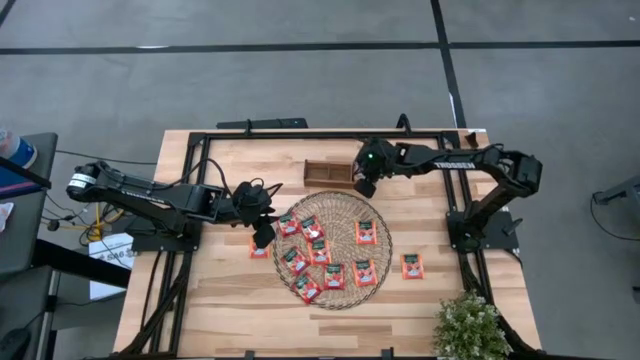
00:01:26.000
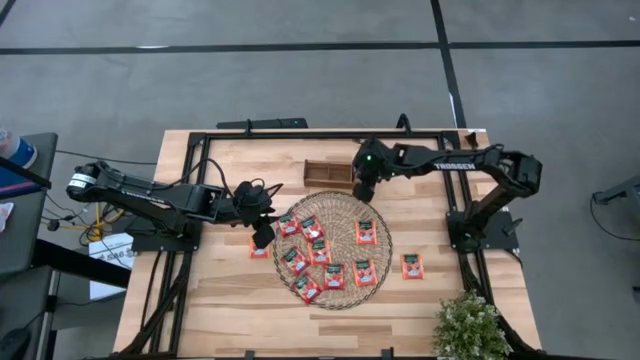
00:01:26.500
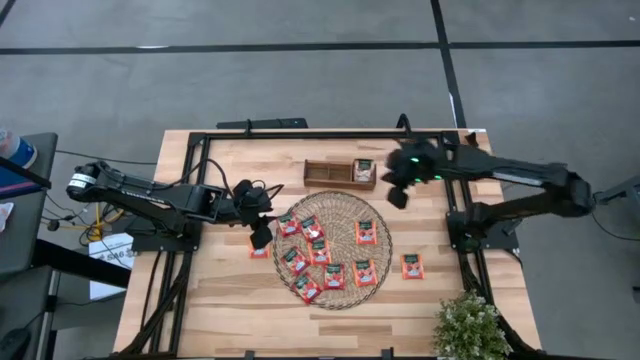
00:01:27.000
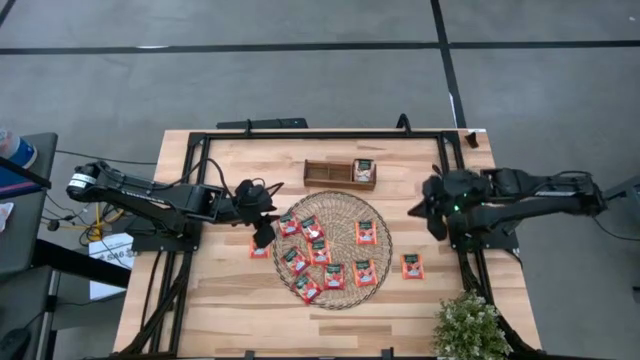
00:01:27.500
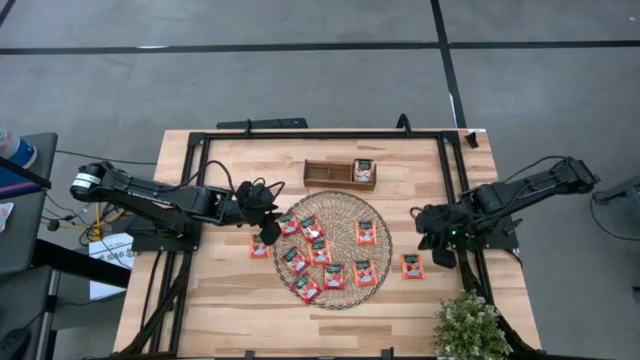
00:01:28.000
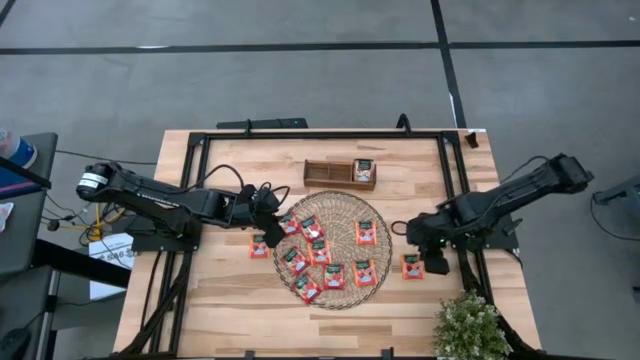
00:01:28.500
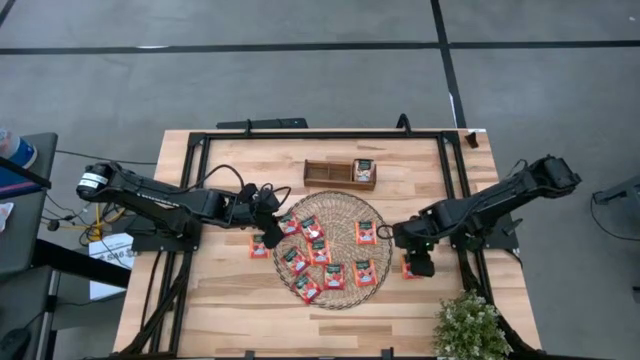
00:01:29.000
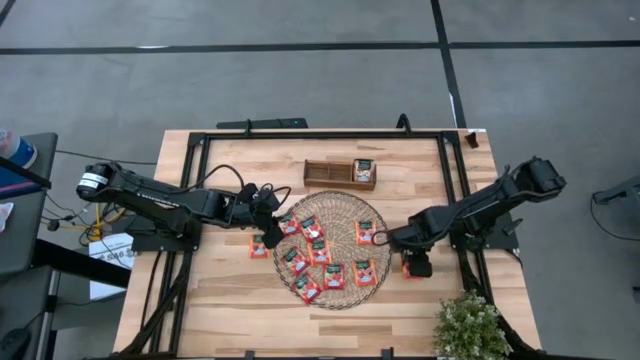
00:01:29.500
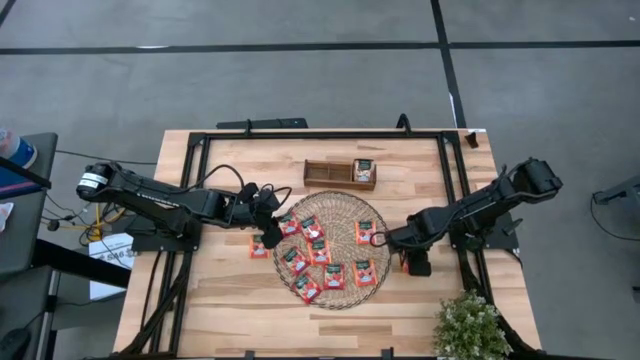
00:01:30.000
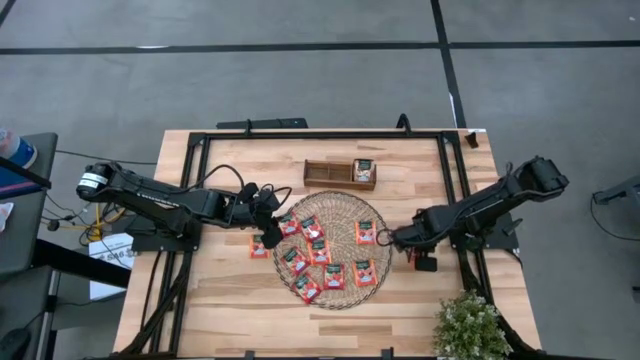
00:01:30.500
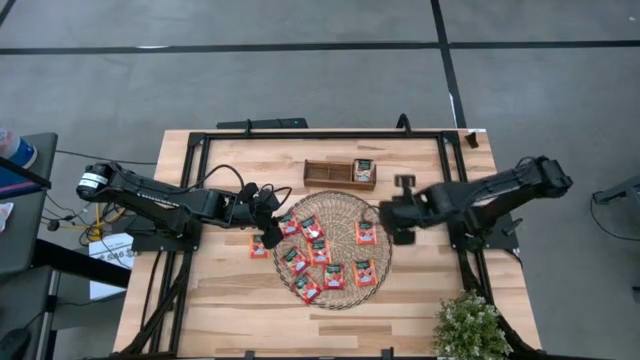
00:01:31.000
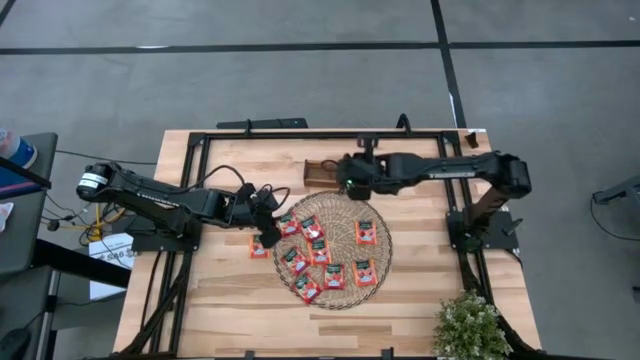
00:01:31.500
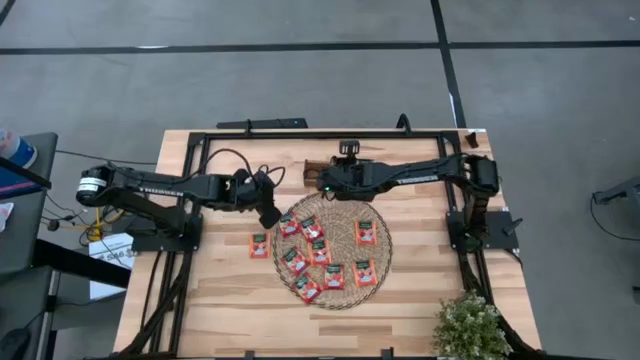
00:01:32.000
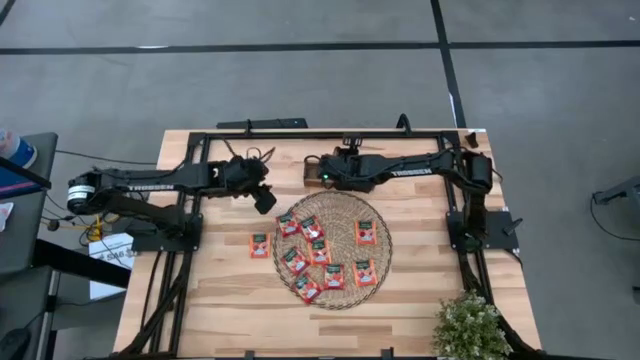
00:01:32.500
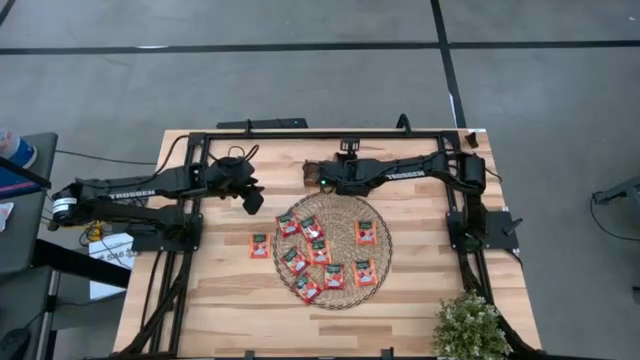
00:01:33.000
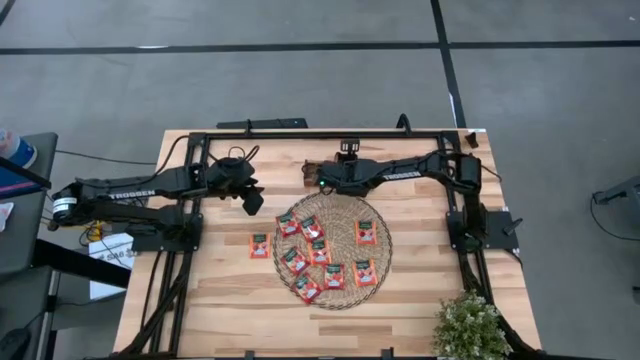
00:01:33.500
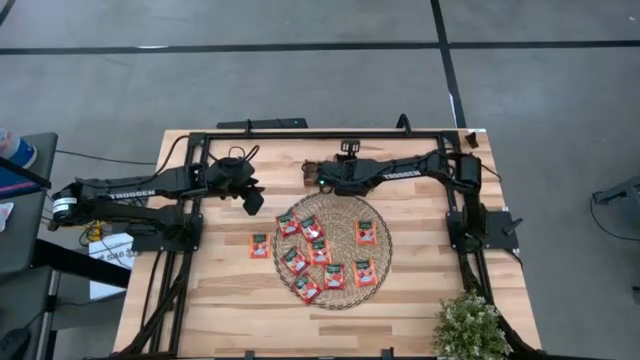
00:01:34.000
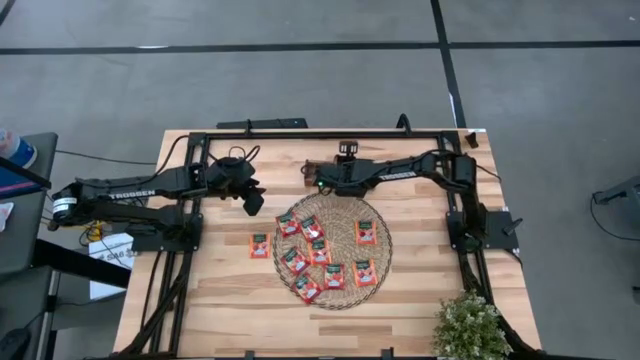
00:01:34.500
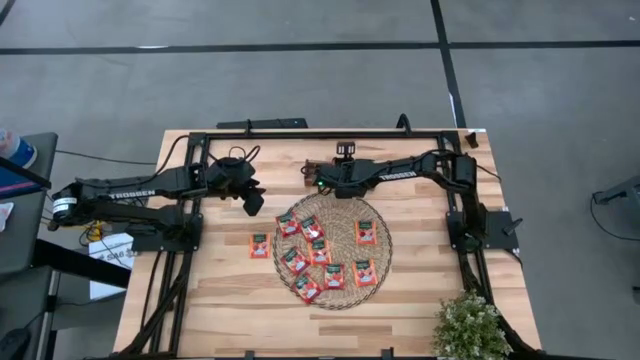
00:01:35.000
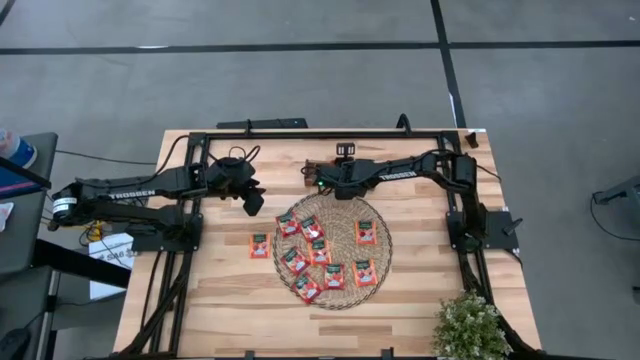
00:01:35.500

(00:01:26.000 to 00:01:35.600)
Task: Pick & Place Tea
Put the orange tea bag into the middle slot of the wooden organizer

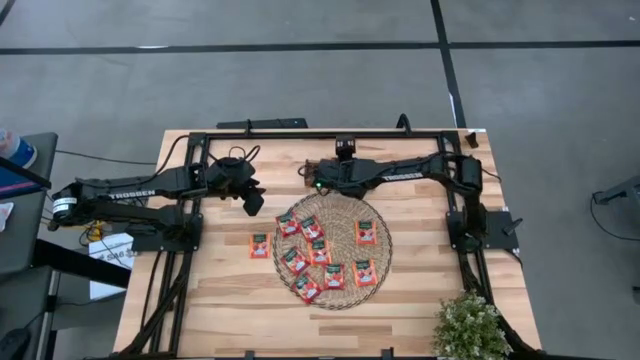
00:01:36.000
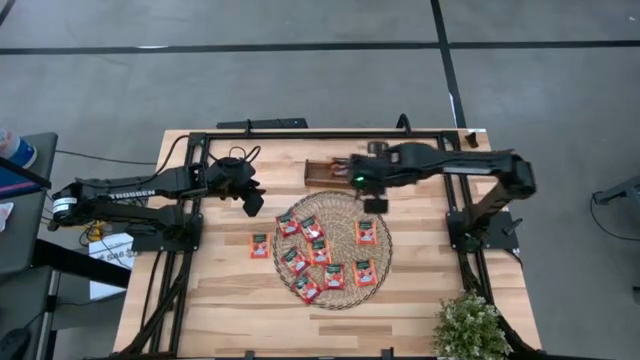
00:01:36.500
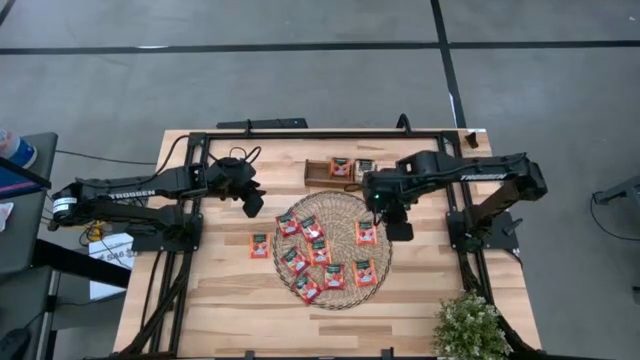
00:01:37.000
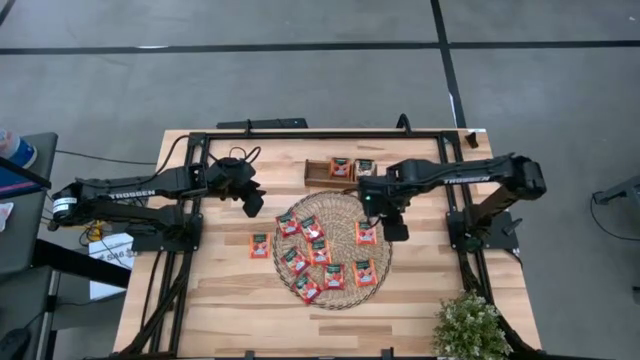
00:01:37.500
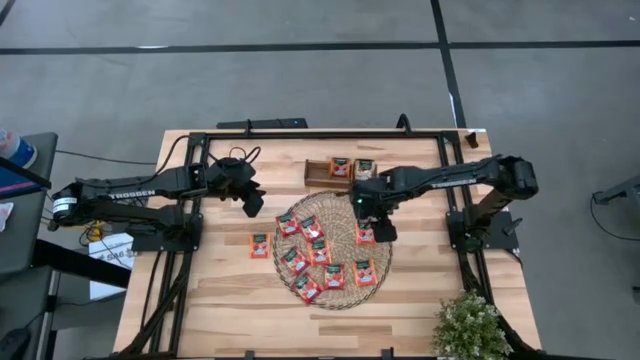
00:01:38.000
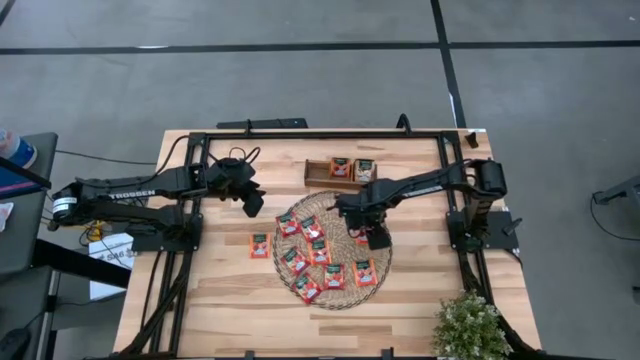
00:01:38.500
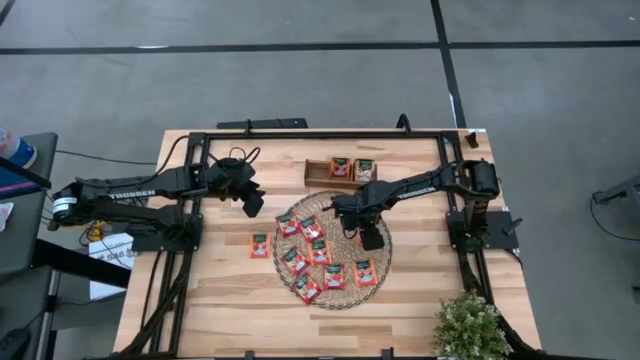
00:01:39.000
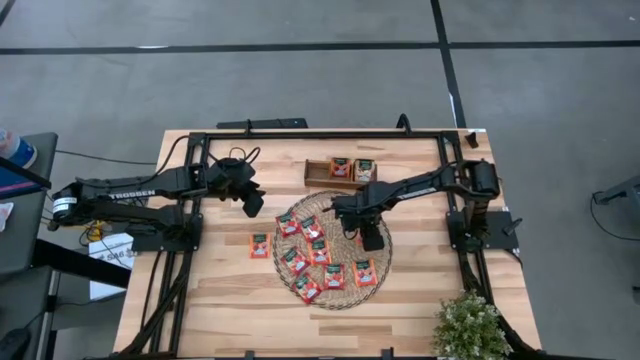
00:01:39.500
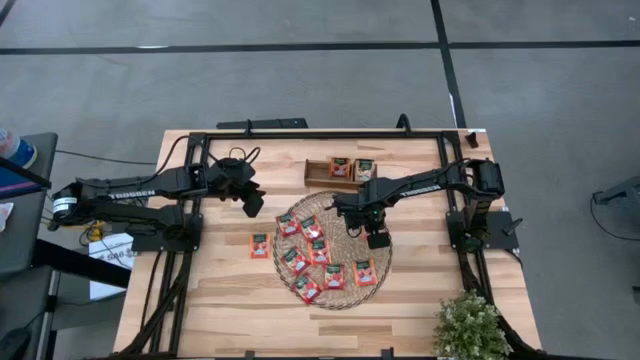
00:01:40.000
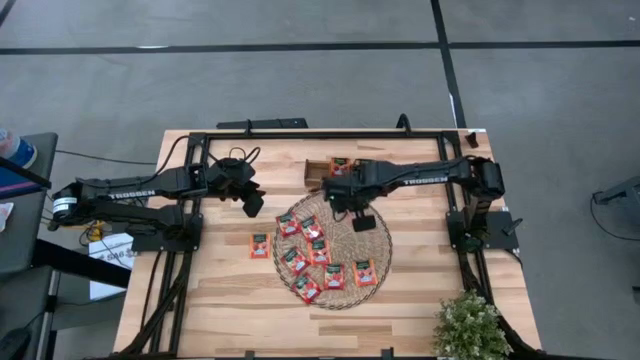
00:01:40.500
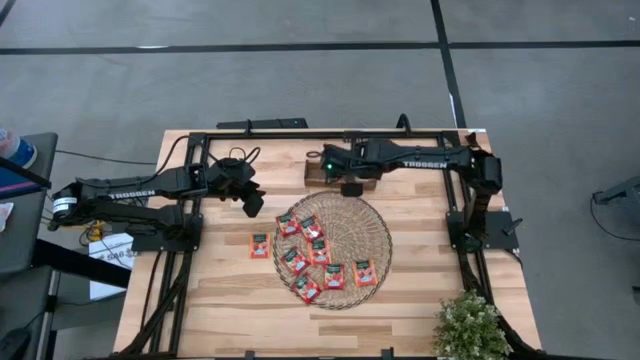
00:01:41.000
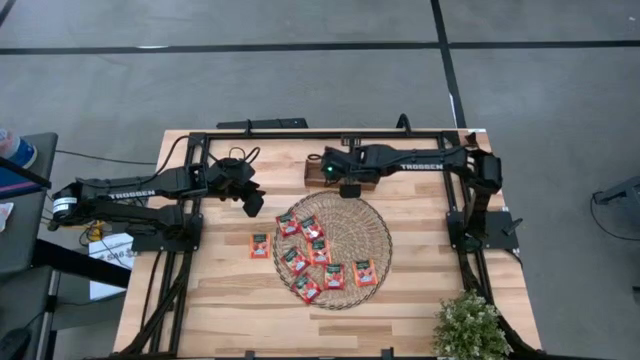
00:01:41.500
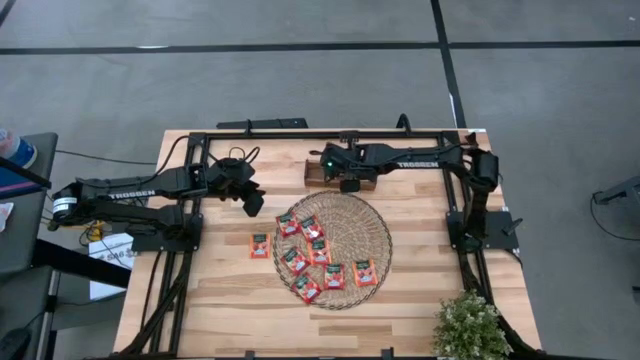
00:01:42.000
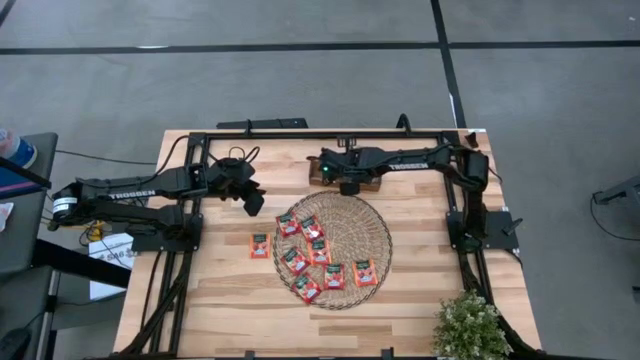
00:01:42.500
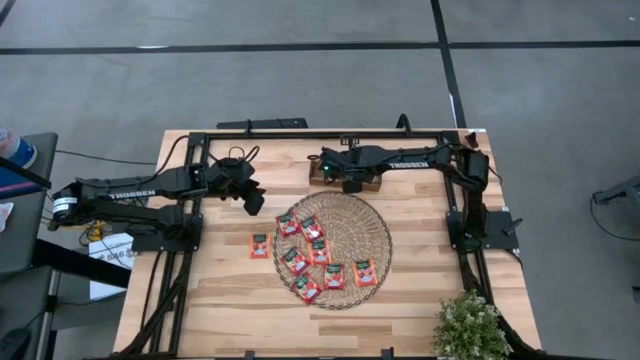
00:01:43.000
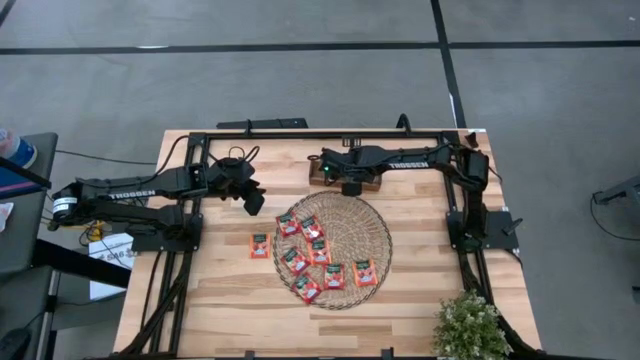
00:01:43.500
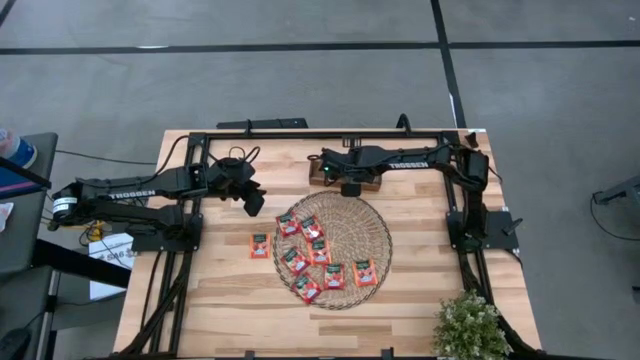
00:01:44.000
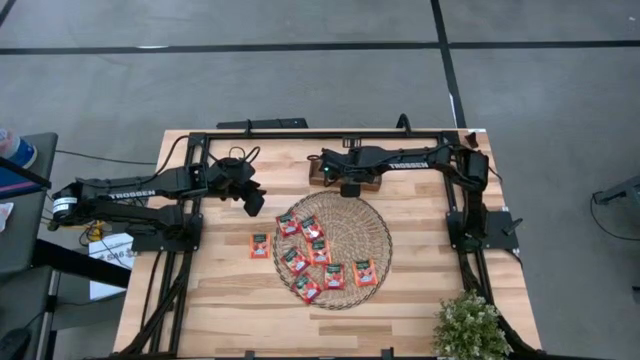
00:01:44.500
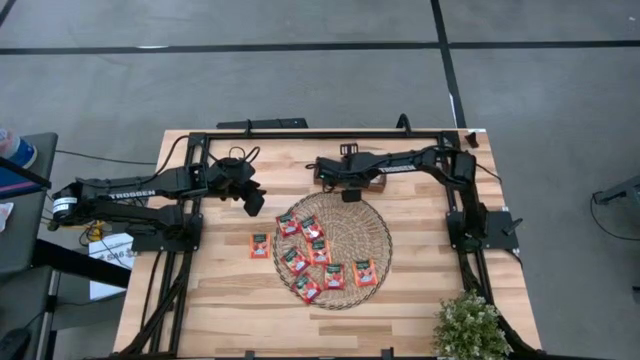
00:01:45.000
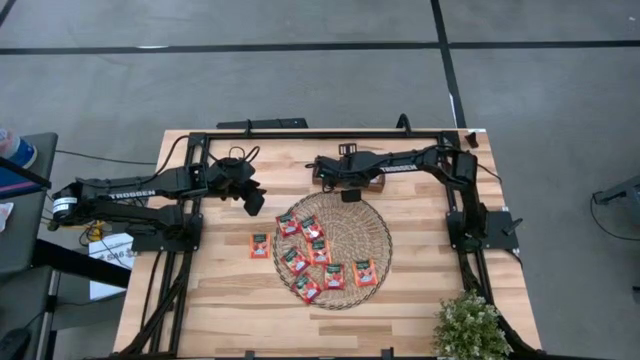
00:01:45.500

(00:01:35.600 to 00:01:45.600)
Put the orange tea bag into the middle slot of the wooden organizer

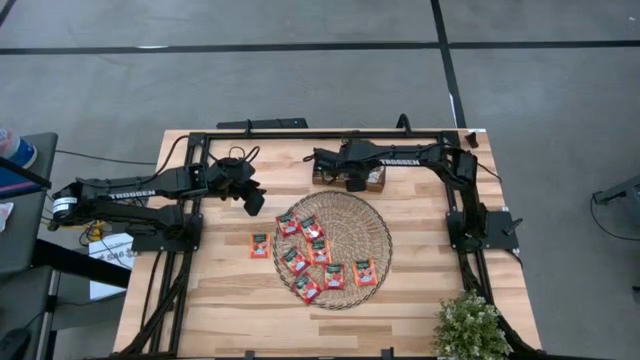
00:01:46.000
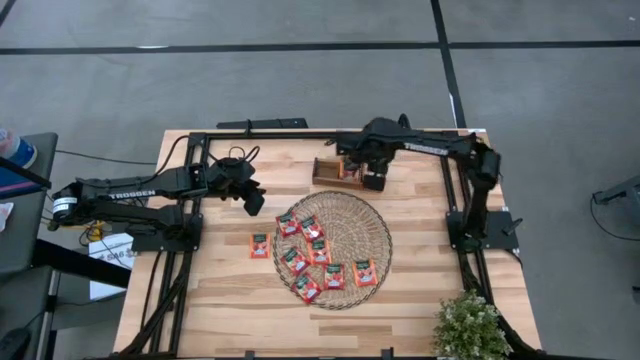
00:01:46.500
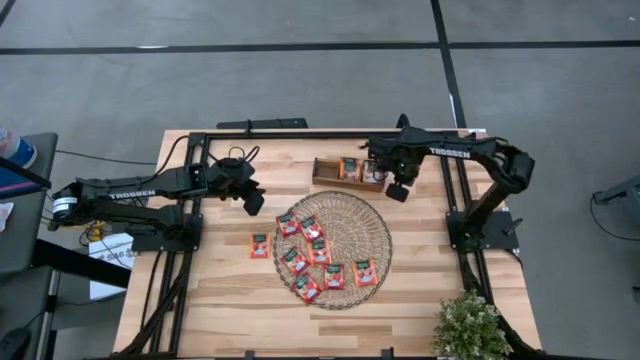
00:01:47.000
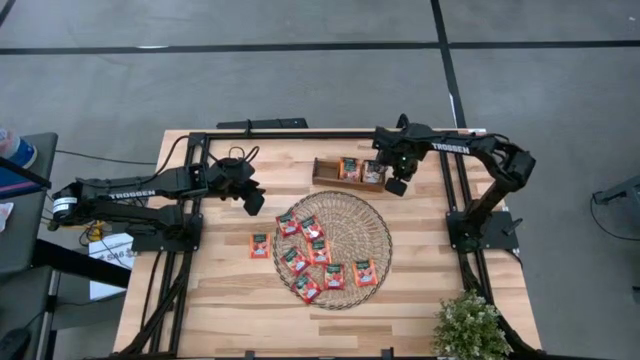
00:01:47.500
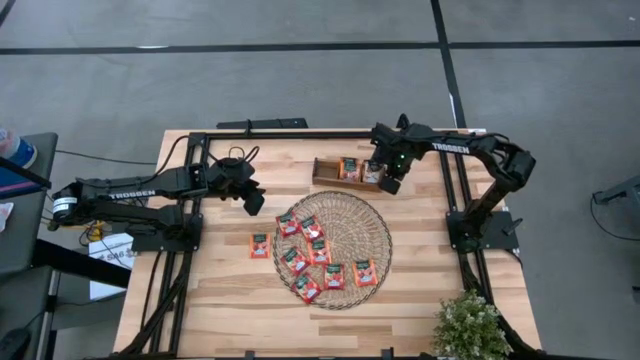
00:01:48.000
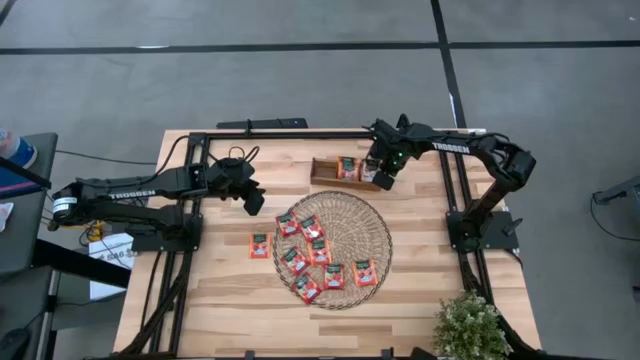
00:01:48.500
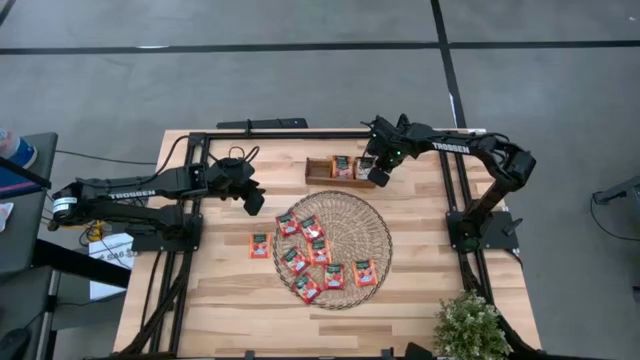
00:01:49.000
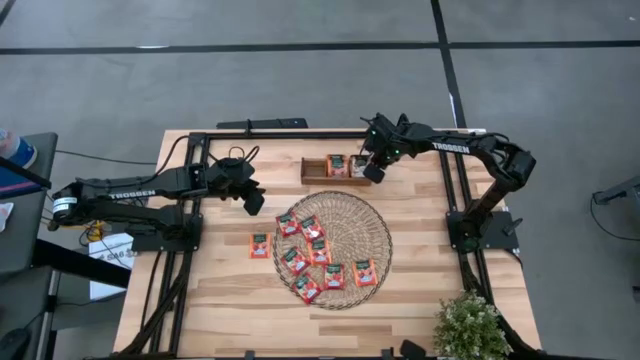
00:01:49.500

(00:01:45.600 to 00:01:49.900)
Adjust the wooden organizer on the table
